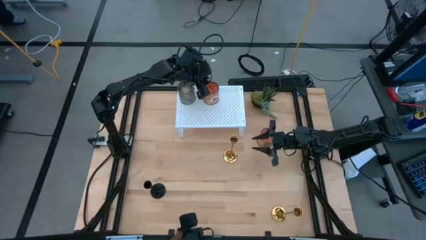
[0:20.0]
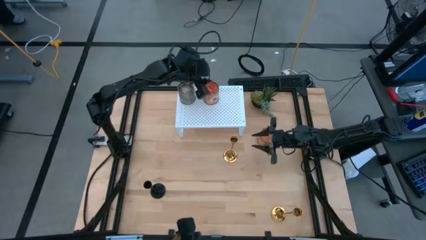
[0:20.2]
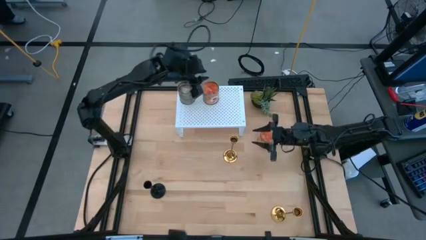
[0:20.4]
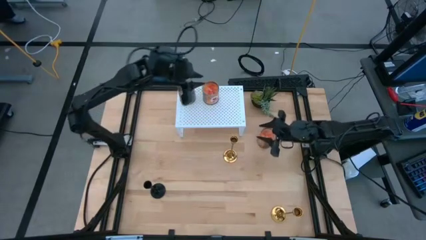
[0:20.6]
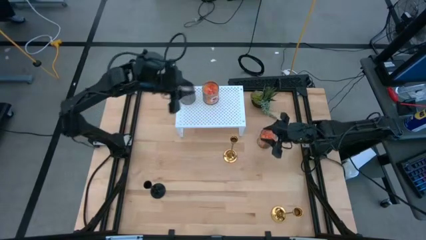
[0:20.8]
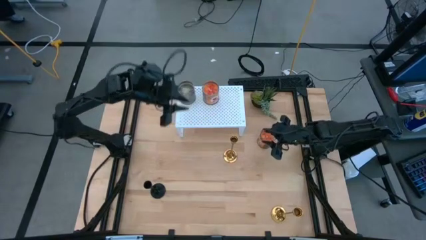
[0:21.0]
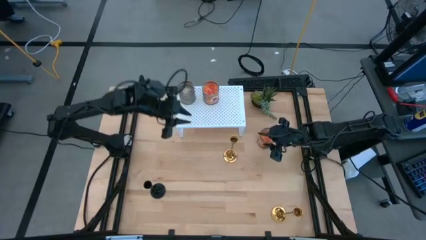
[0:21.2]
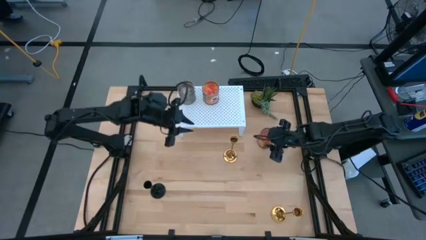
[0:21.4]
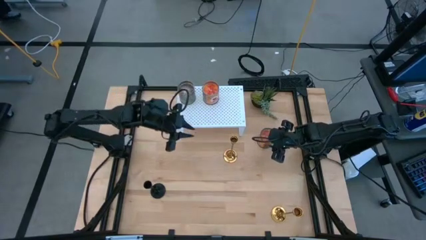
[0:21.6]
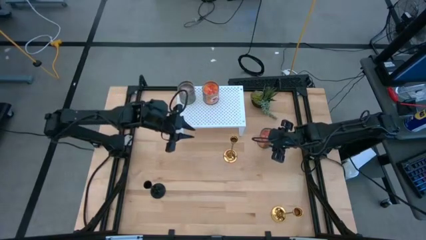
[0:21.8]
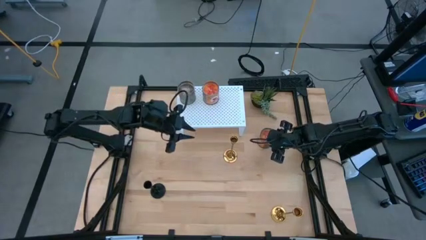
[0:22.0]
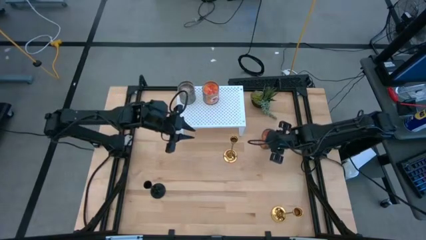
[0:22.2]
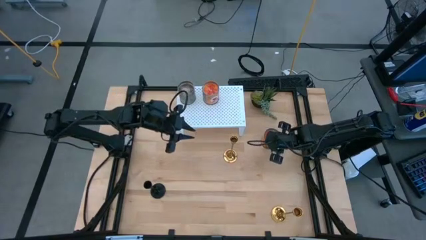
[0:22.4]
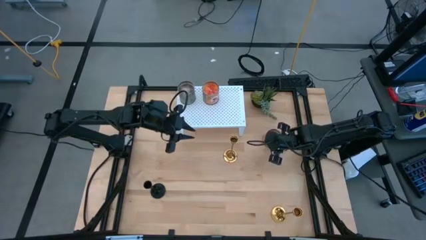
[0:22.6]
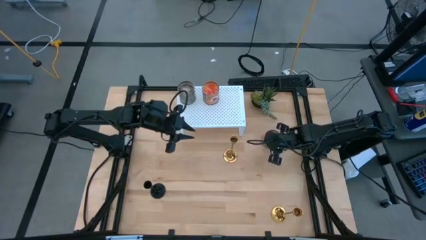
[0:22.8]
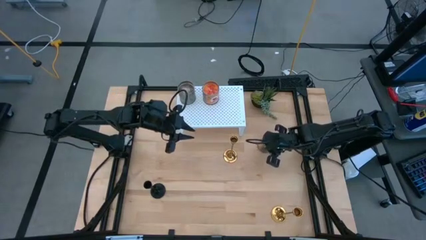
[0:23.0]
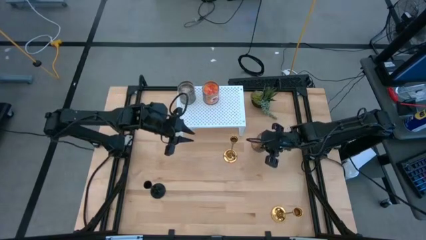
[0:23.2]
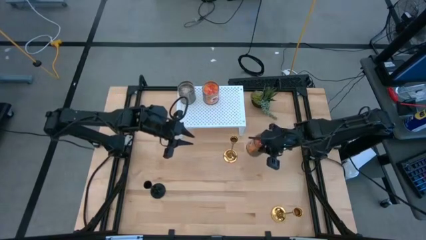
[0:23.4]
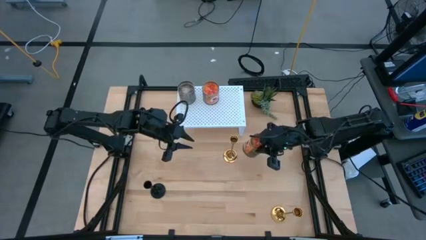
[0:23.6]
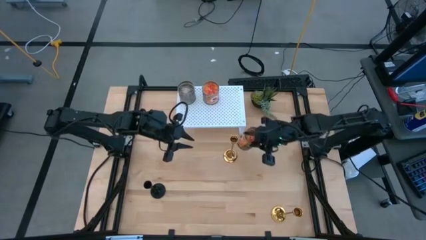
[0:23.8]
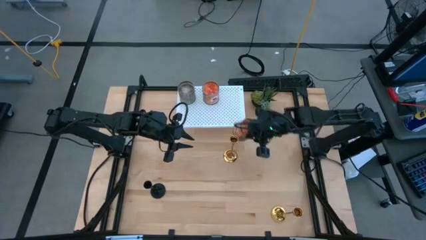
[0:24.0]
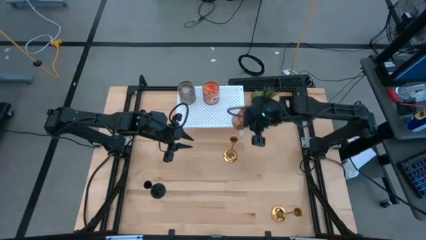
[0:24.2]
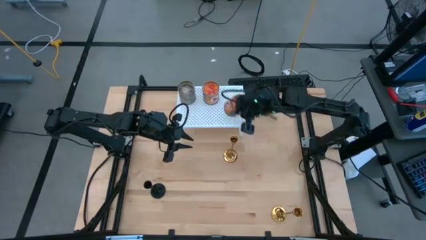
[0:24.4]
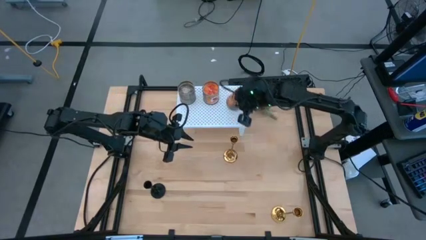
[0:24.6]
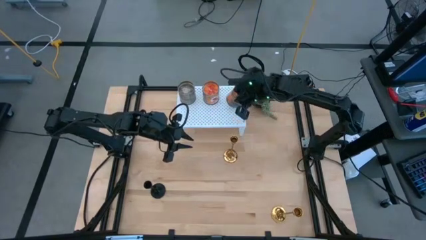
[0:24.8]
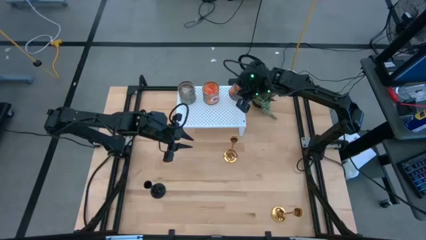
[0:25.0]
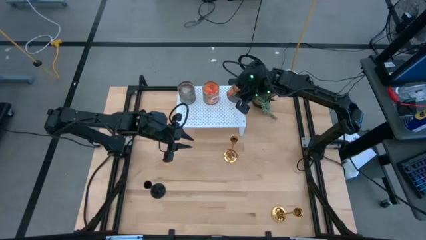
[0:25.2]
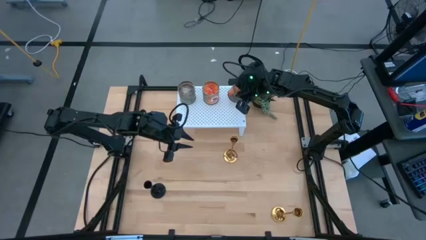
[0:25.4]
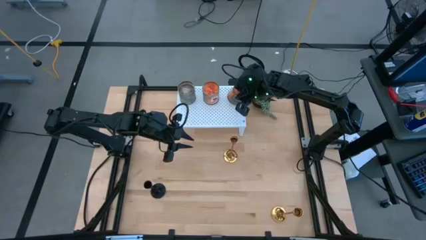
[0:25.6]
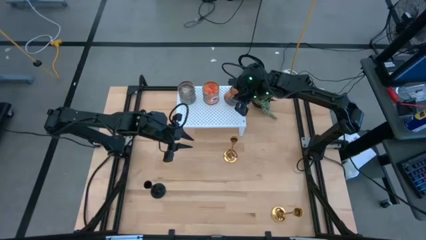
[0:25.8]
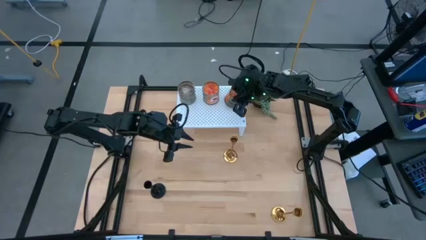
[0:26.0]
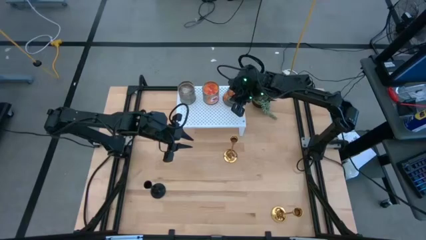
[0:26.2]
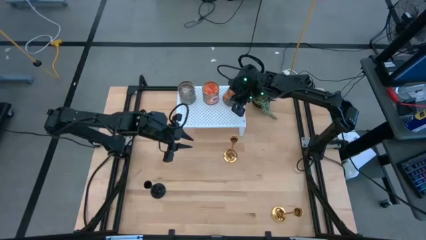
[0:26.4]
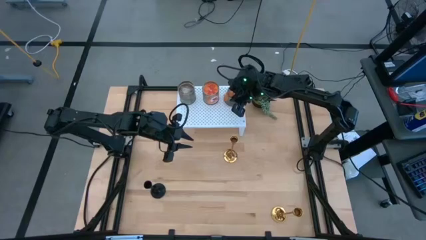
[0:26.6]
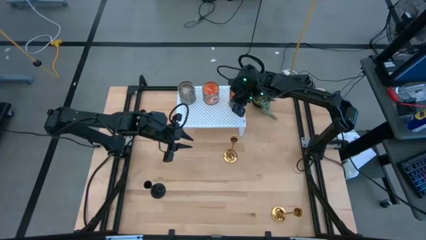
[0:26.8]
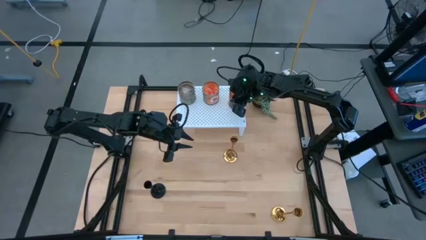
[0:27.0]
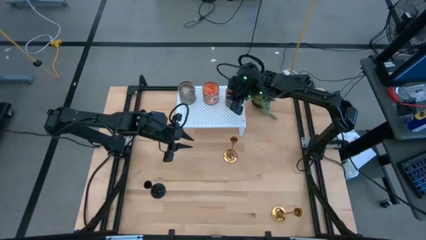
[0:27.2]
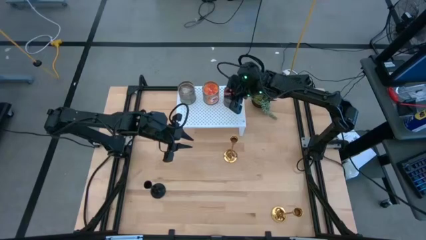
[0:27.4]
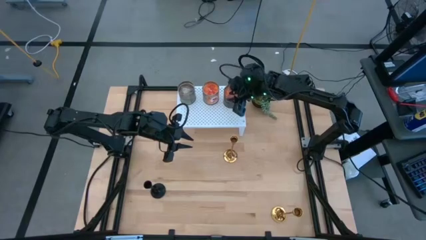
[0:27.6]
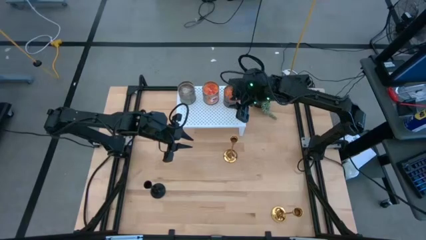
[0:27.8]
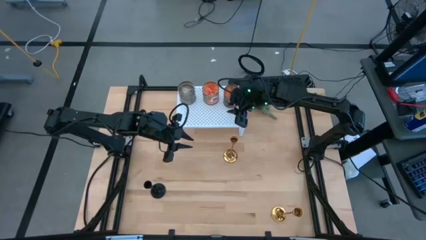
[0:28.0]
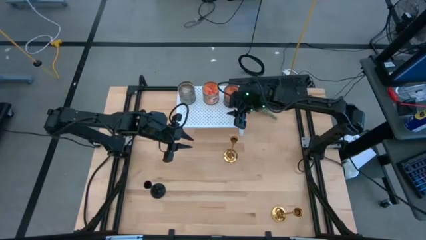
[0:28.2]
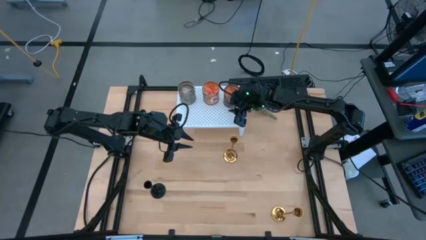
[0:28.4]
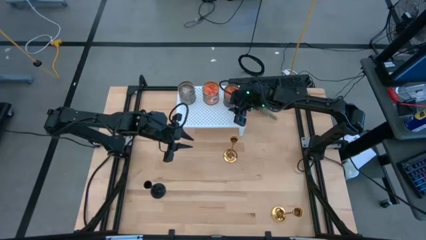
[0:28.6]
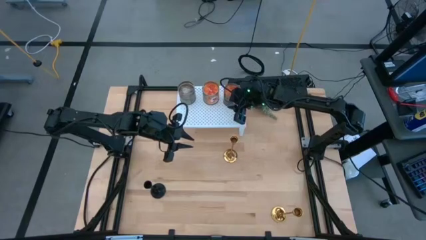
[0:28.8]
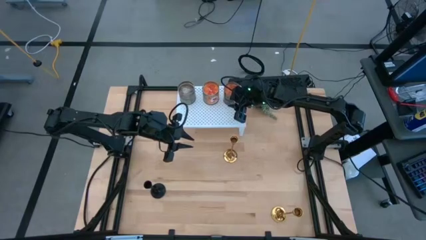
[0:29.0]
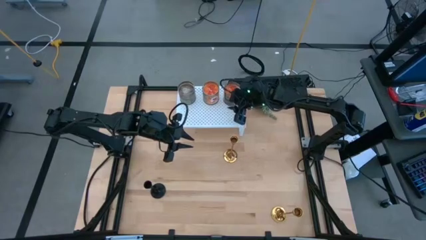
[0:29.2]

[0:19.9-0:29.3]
Task: Pick & Place candle stick holders
Put the orange scented candle on the shelf aligned with the other scented candles

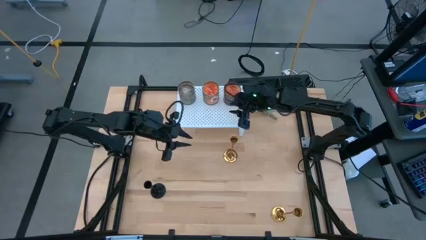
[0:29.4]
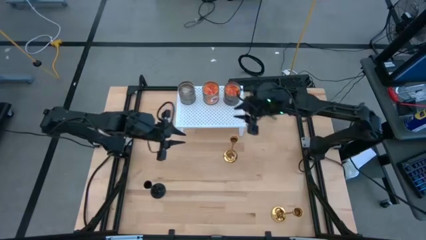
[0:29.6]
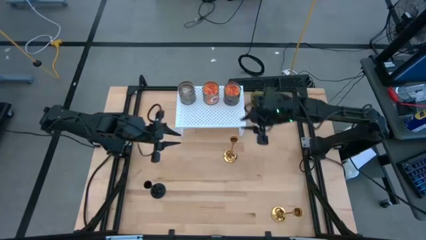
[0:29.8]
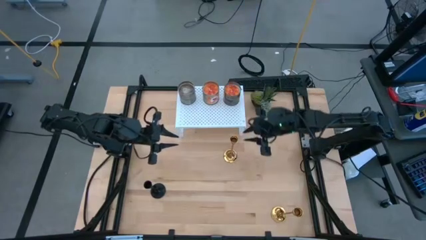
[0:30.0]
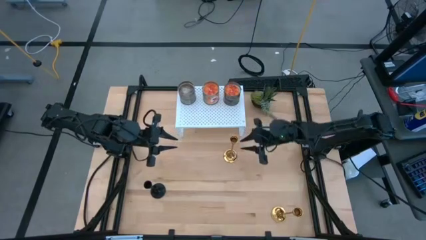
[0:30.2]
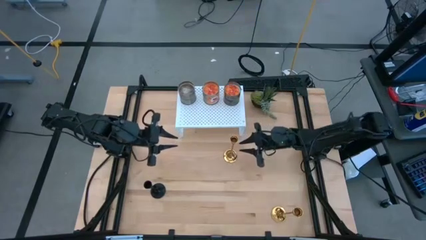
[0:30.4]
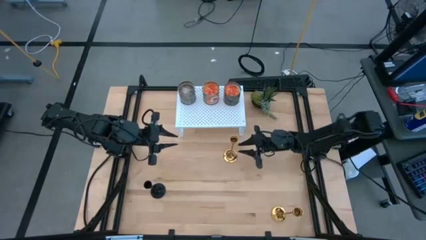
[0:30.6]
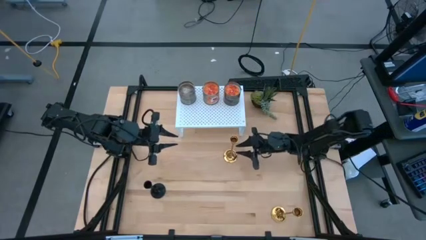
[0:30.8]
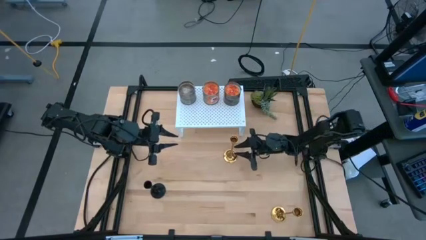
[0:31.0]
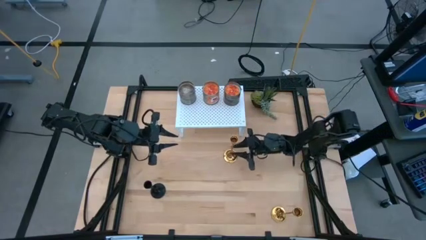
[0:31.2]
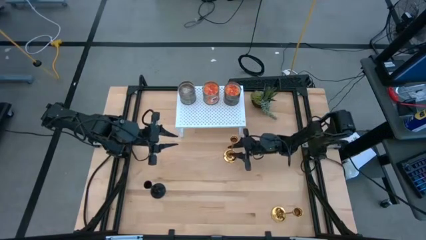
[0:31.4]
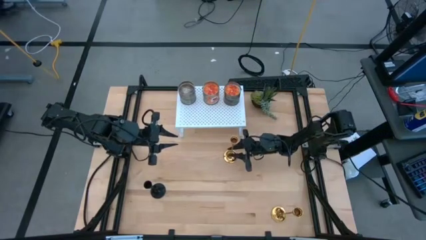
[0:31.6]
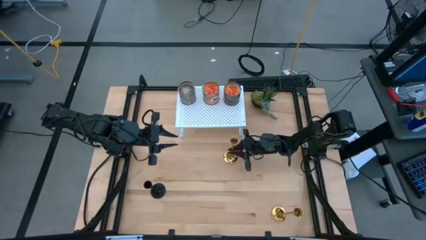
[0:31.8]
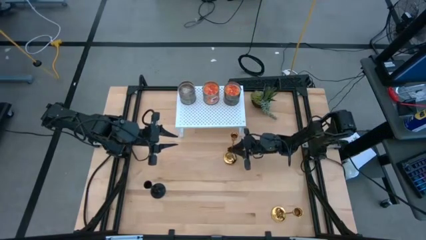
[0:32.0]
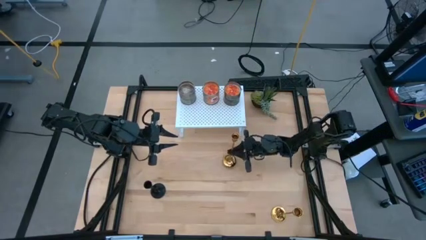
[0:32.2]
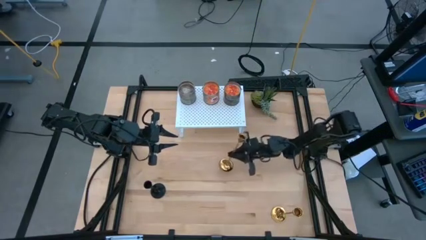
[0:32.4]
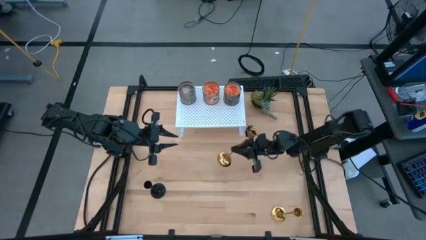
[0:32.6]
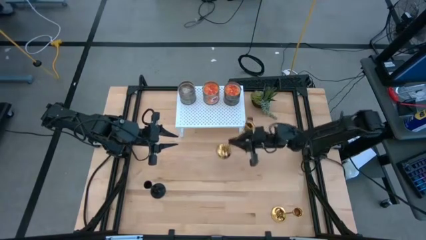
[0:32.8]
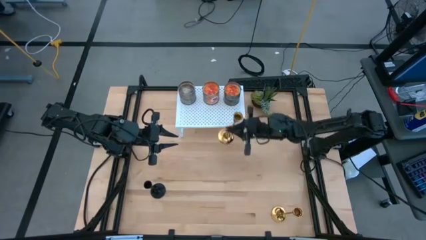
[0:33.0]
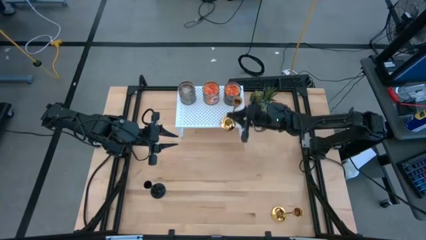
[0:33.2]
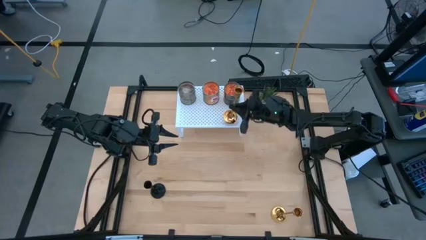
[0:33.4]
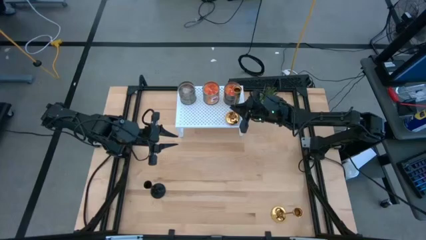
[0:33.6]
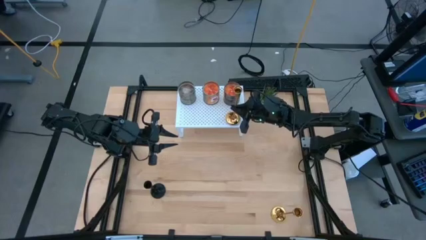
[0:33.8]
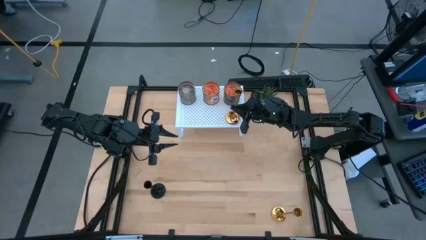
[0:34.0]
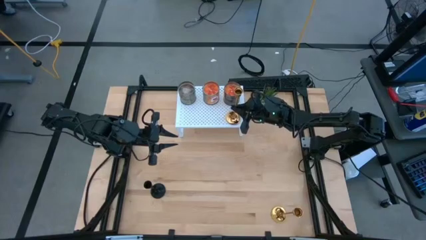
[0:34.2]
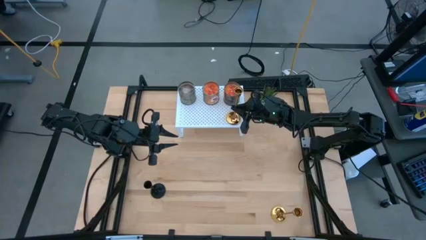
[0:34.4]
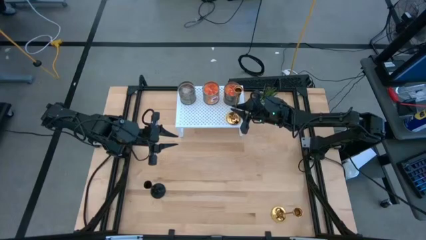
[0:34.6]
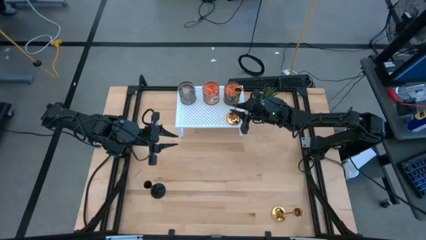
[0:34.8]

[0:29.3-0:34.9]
Put the top gold candle holder on the shelf

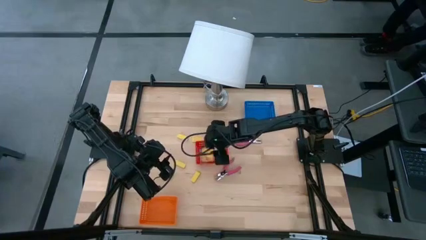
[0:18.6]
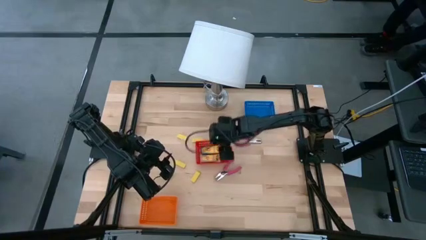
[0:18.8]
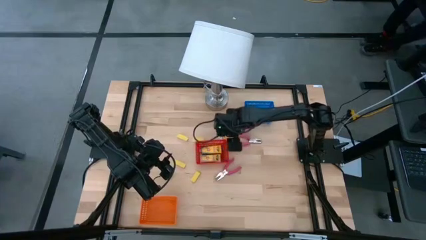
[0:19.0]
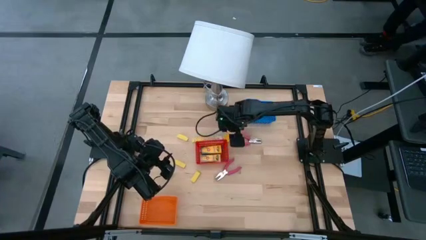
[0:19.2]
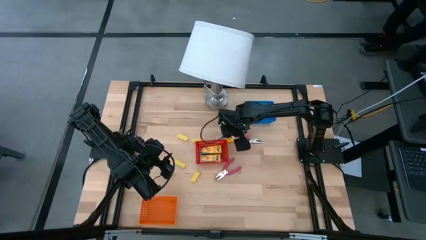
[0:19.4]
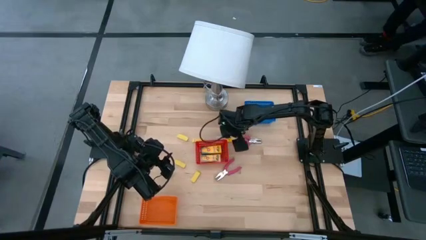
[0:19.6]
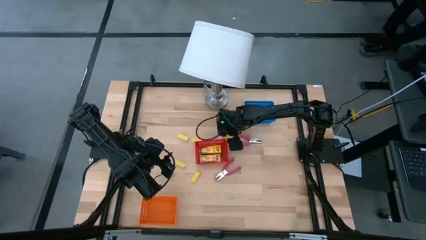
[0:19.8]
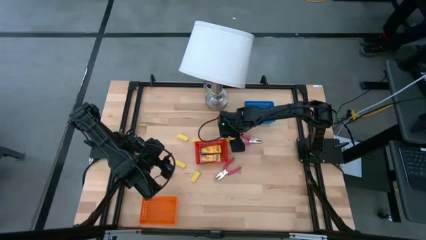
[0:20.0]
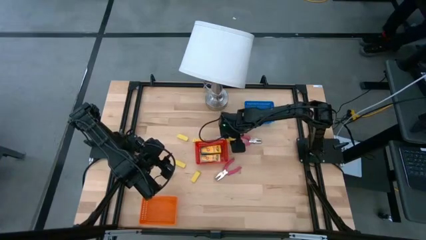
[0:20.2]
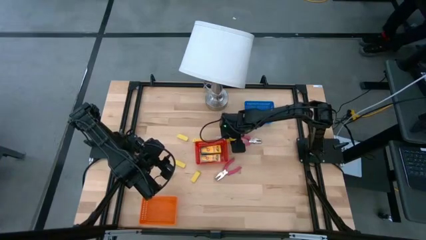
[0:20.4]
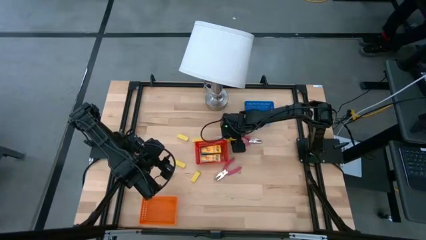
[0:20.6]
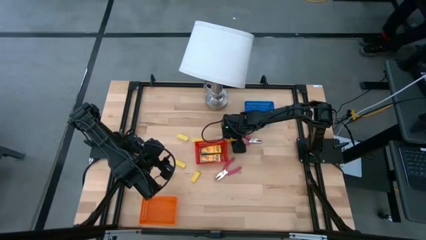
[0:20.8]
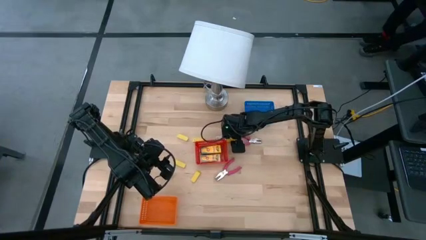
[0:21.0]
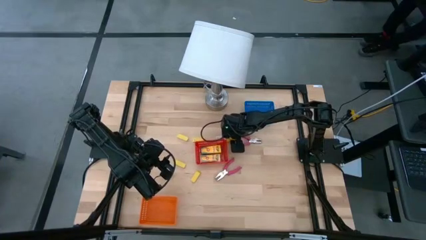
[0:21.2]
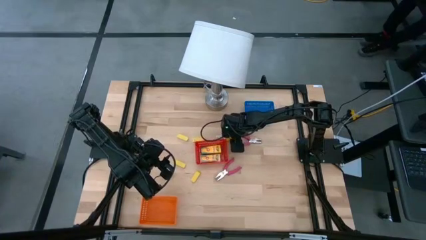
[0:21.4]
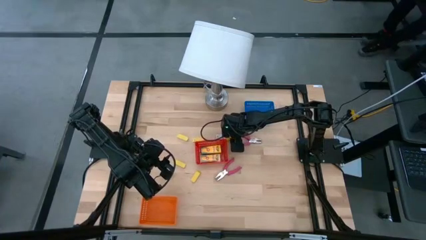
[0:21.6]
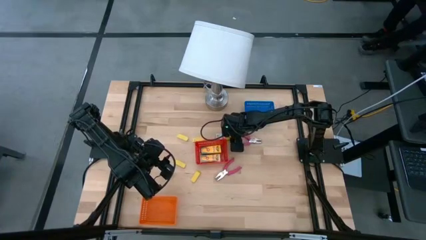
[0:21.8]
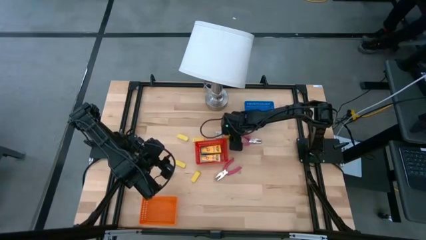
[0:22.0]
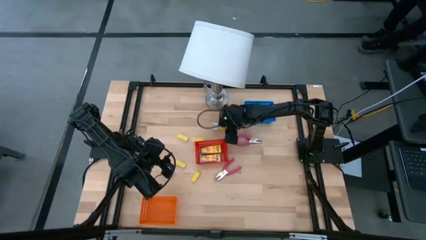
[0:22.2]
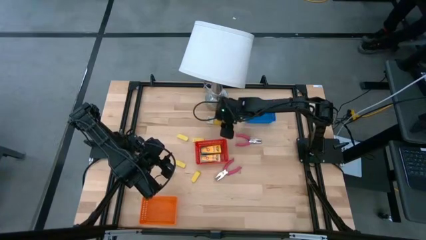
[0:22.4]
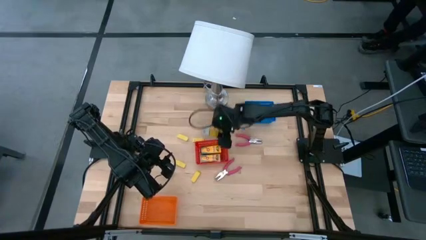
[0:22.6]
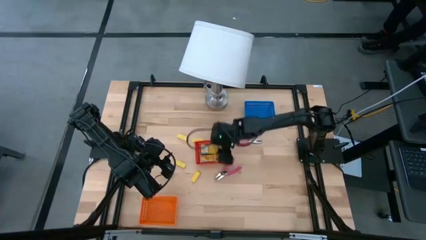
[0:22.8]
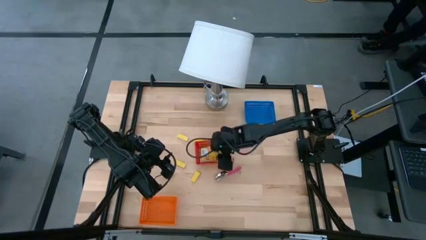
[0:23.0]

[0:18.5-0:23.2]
Task: Pick & Place School Supplies
Put the yellow crayon box into the red bin
